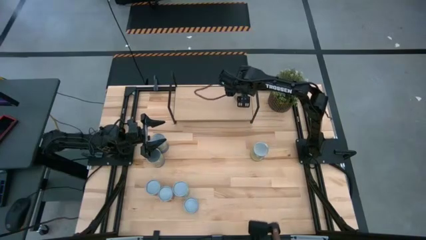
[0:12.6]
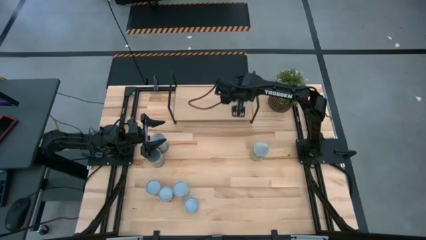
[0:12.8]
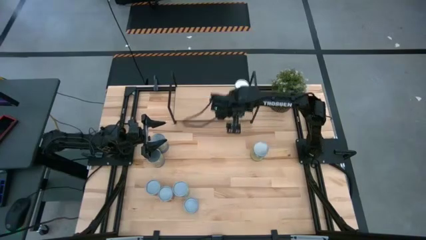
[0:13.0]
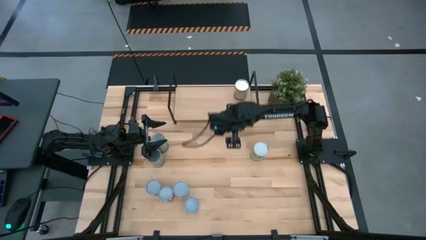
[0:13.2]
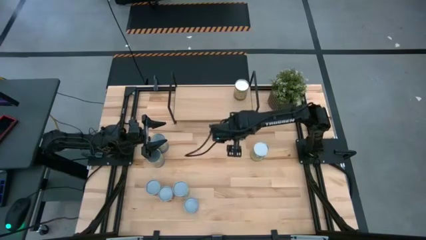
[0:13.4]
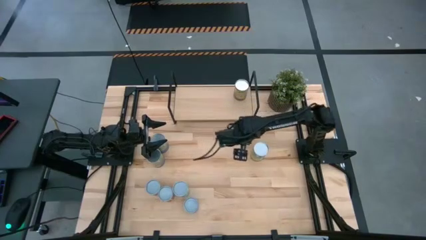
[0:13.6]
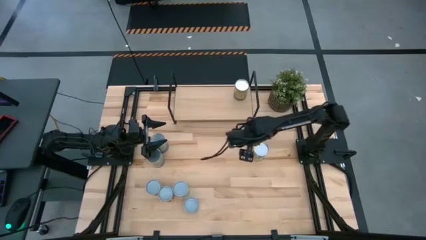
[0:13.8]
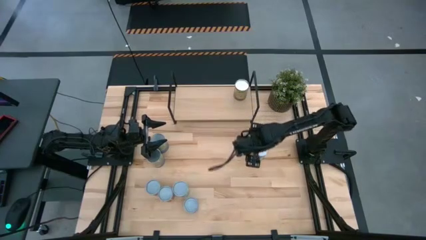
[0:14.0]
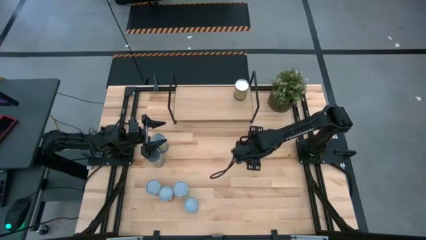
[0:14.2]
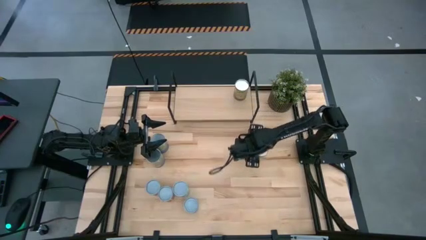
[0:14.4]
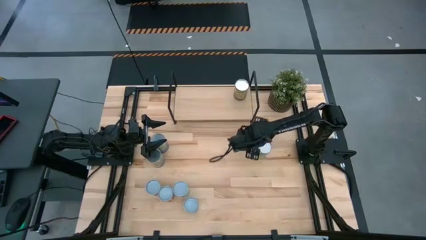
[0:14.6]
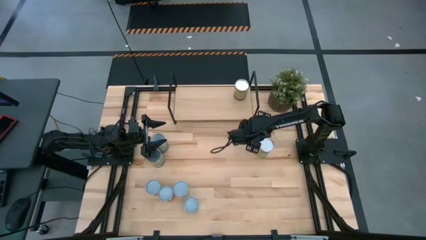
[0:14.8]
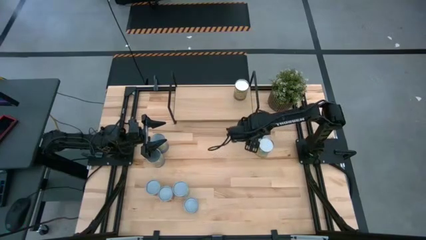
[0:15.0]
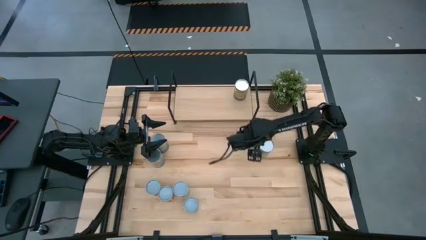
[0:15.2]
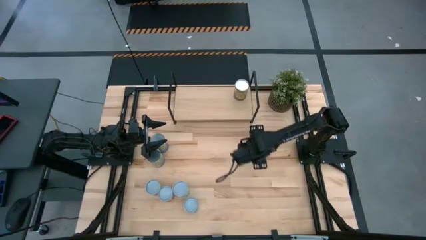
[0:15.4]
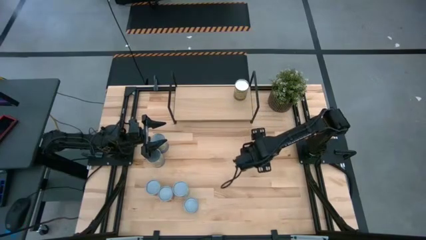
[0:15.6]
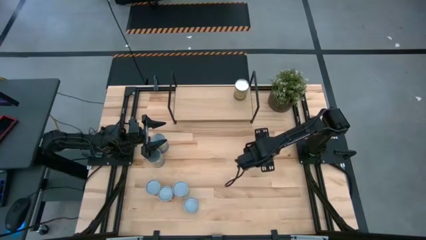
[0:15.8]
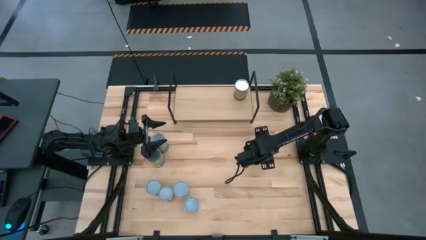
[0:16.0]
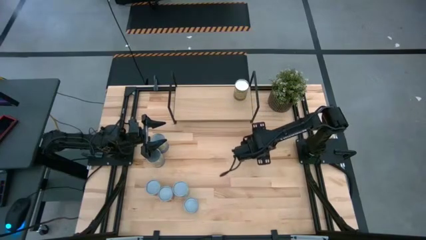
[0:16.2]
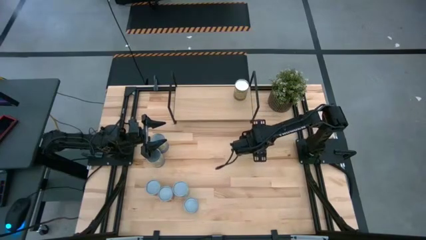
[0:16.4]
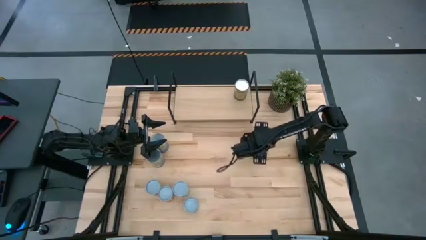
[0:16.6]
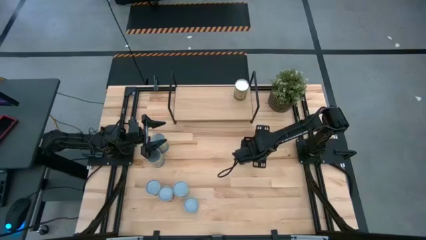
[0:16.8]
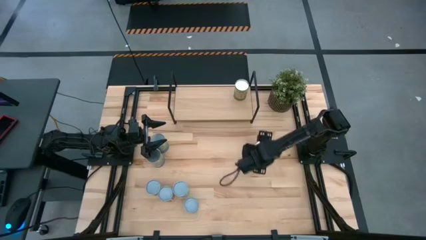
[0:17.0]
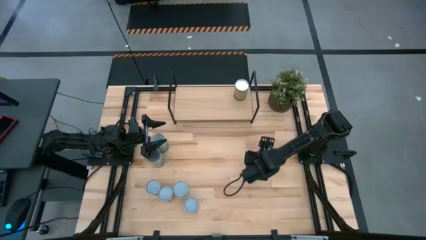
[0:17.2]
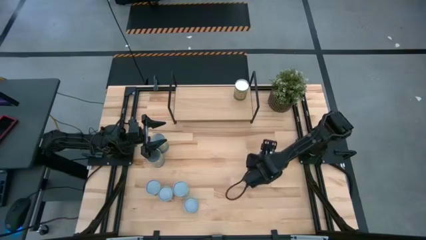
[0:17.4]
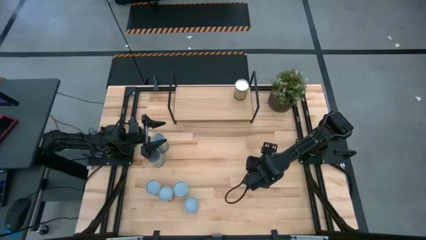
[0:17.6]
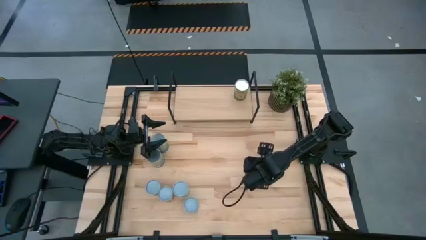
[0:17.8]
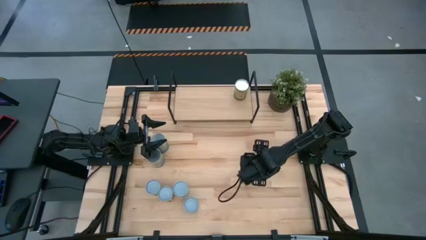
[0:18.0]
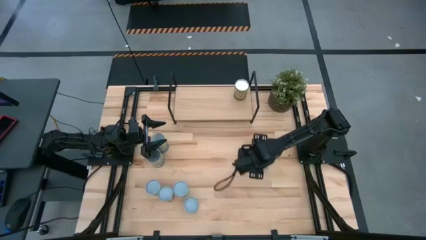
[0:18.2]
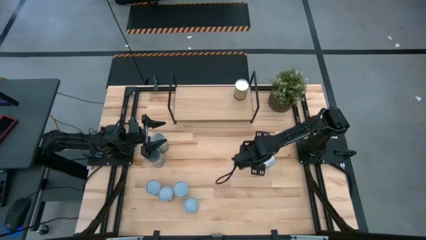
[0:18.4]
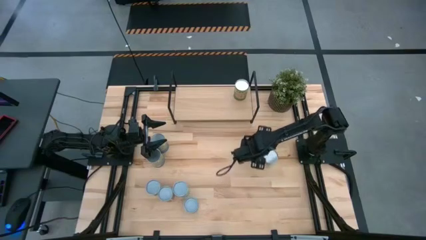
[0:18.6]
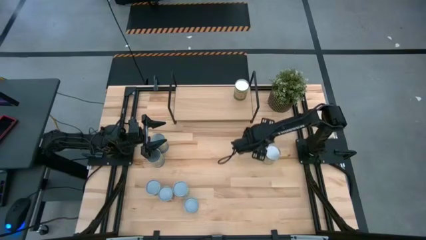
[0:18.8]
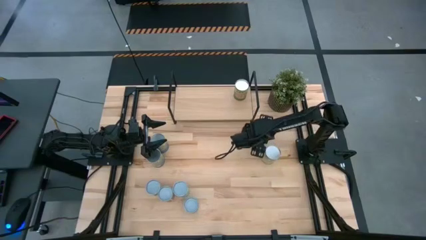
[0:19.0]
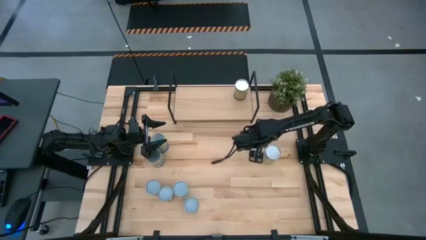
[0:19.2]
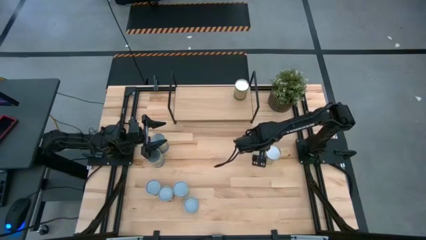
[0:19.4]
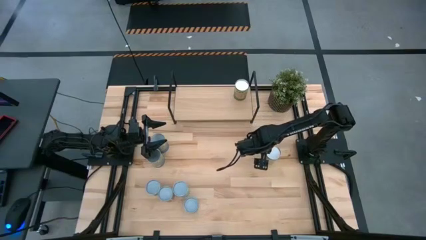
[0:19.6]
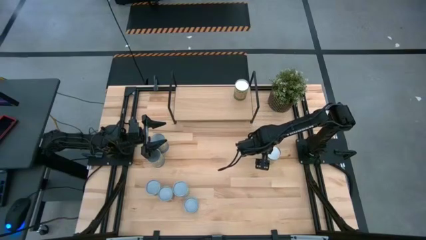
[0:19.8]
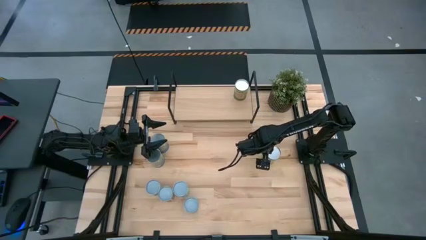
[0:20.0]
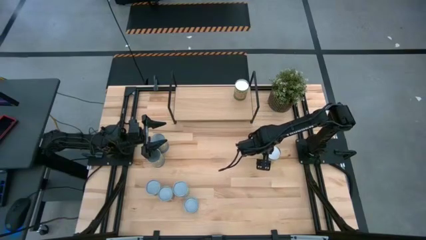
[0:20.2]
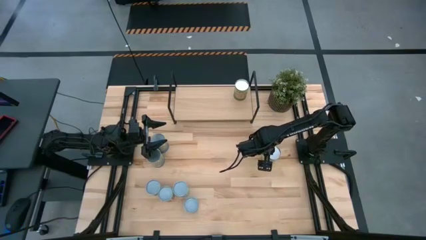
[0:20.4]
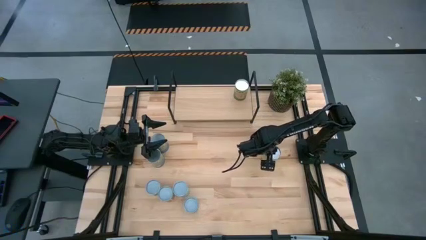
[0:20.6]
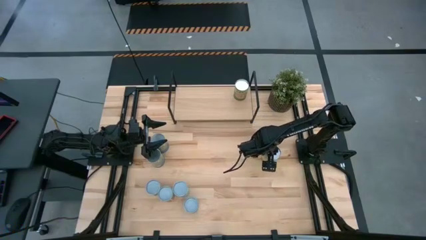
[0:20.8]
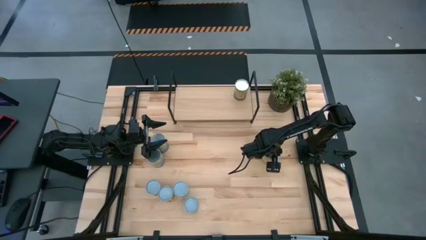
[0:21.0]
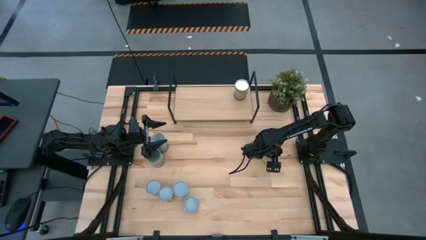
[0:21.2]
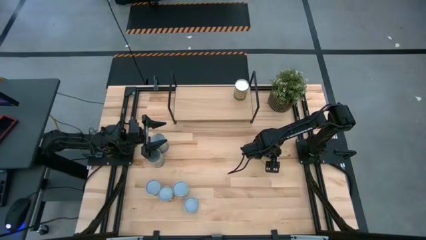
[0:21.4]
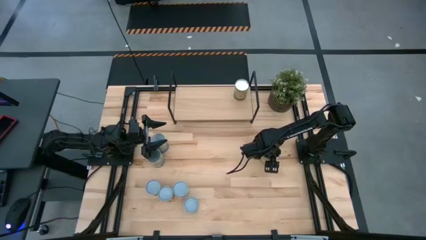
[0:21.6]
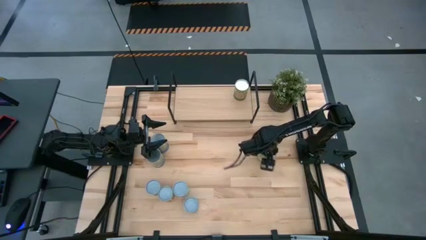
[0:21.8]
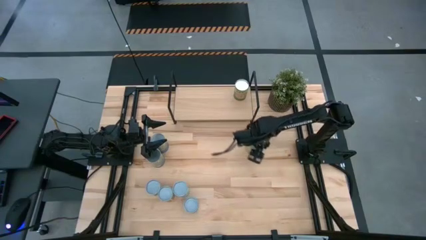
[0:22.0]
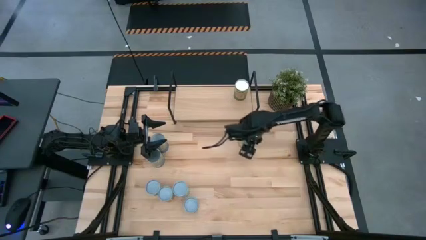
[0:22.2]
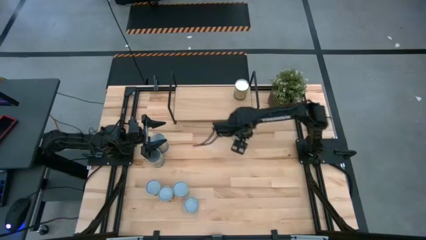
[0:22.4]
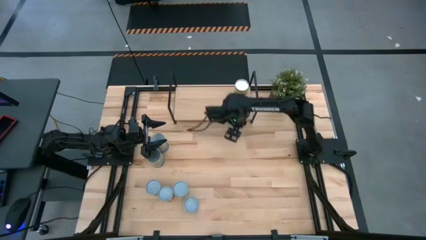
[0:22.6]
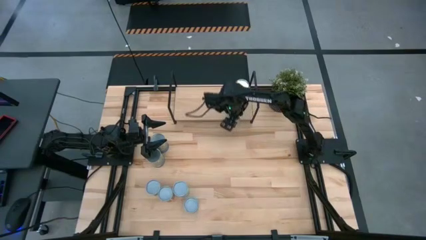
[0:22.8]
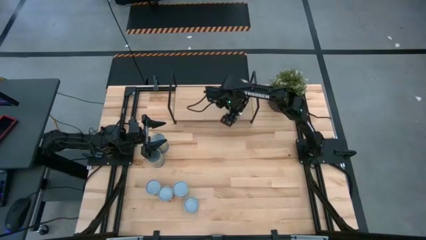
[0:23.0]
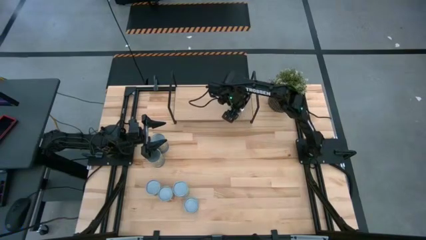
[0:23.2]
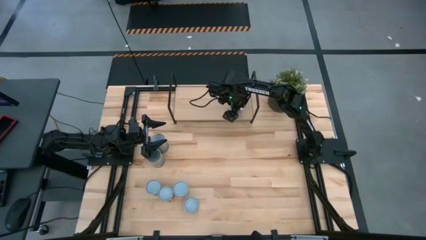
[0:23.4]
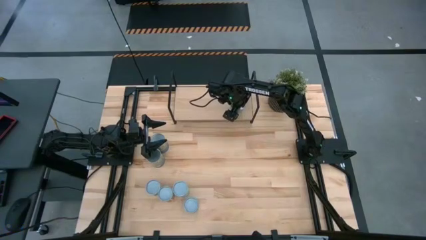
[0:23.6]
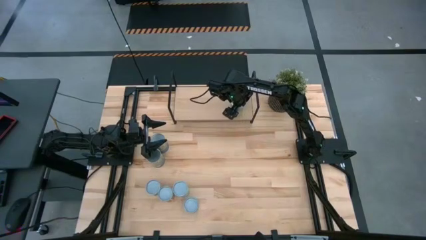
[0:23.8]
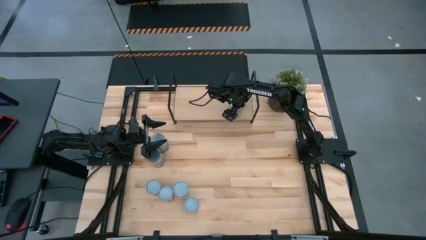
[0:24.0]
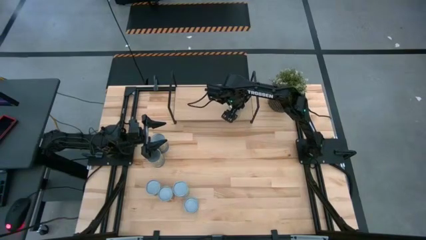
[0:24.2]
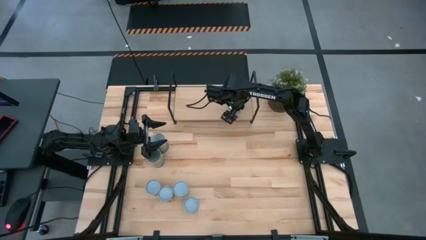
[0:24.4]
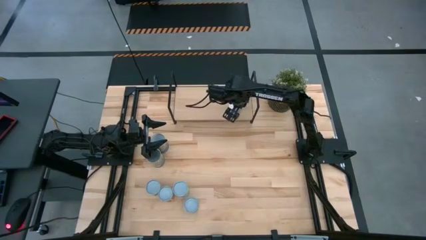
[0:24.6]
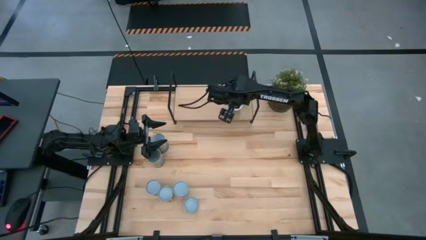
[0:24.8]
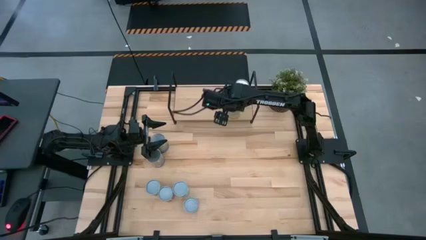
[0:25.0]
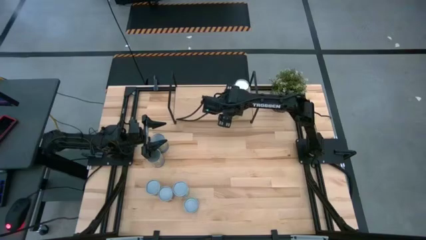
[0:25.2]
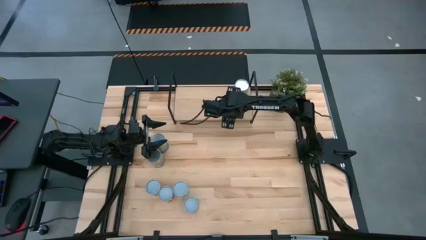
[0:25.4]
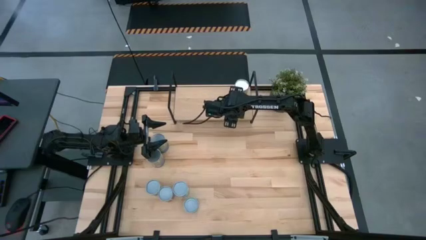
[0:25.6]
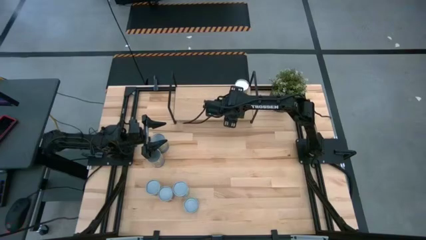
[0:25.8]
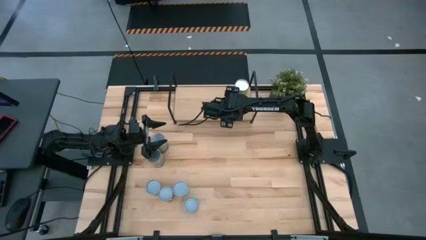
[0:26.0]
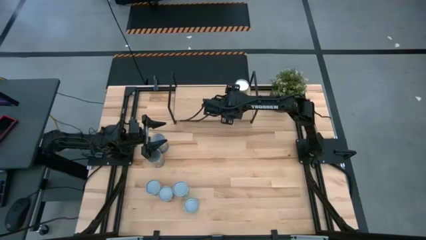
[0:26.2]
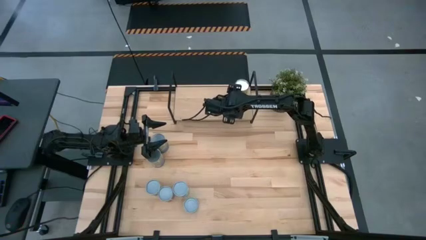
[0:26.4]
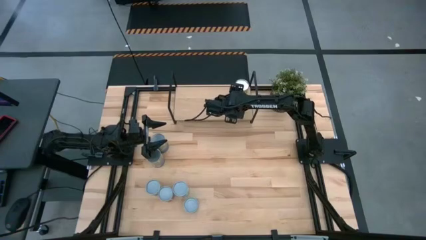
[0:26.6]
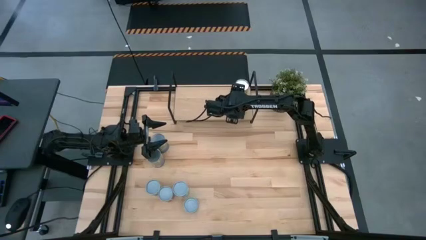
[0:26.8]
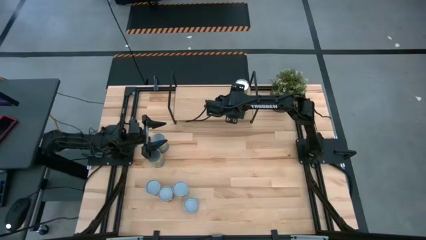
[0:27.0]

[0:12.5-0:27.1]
Task: Pick and place cans onto a shelf
Put the canned carrots on the shelf
